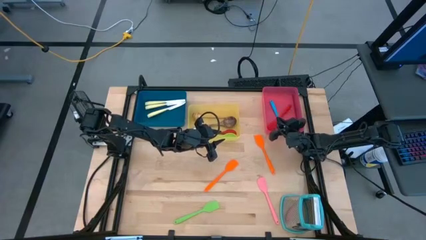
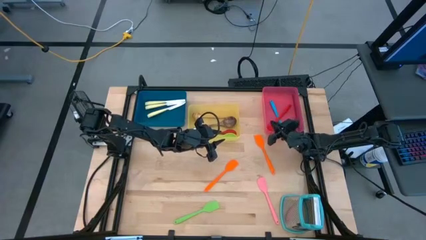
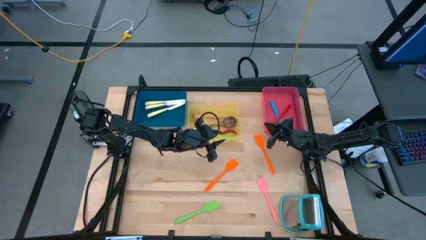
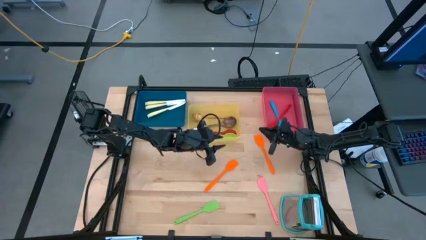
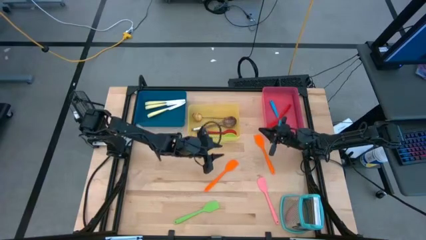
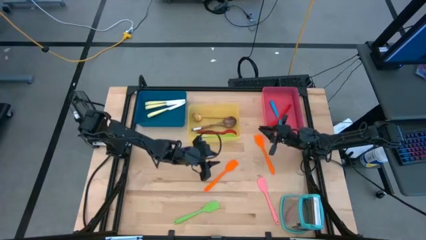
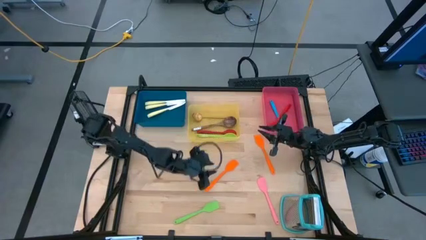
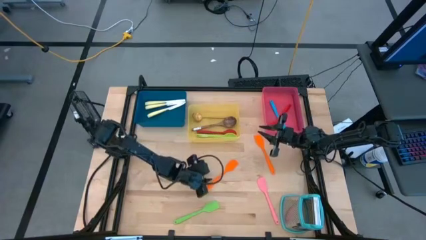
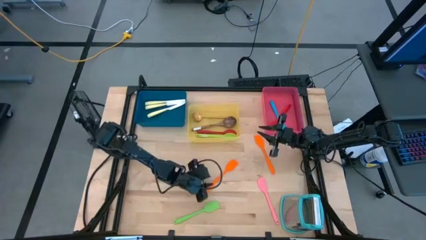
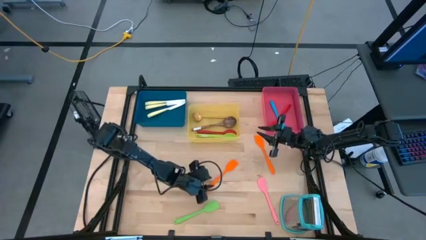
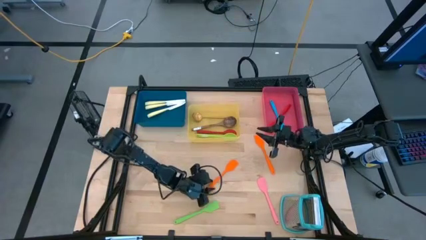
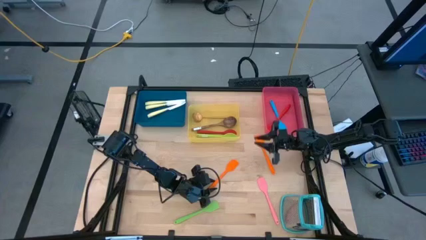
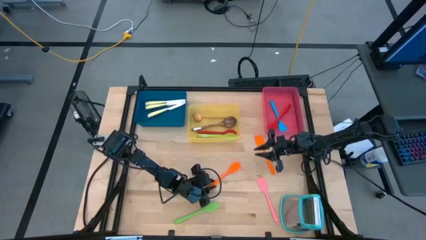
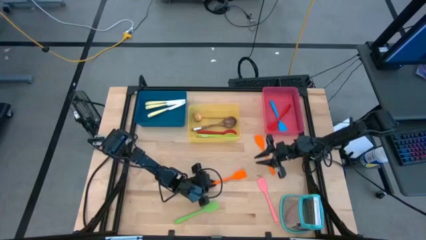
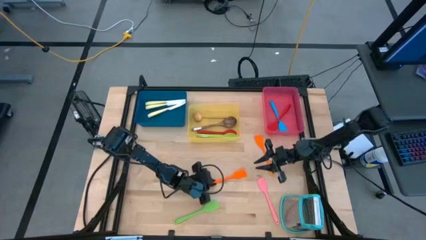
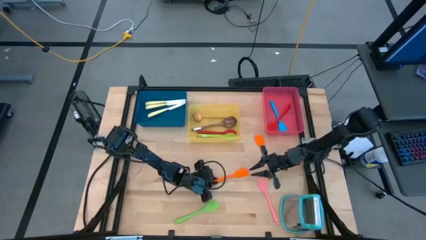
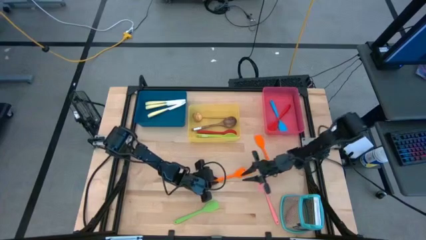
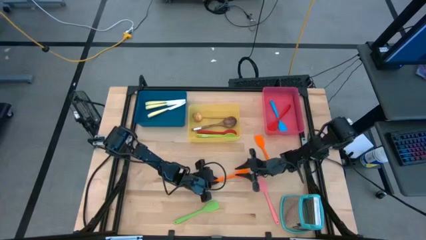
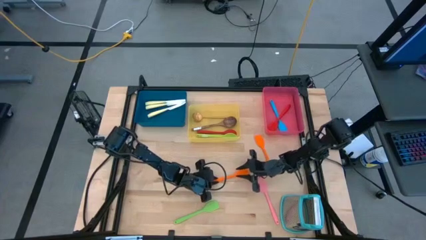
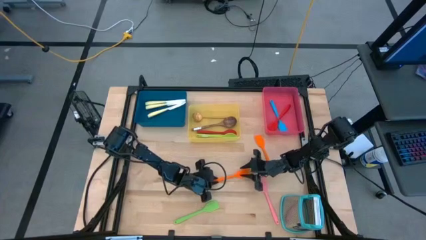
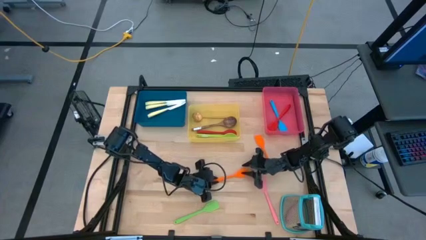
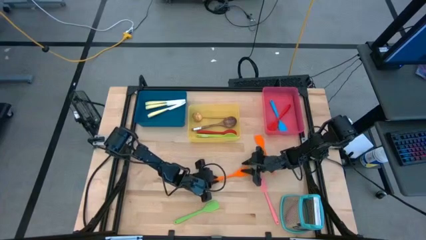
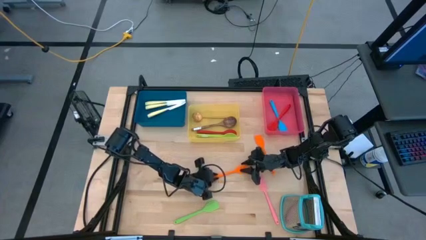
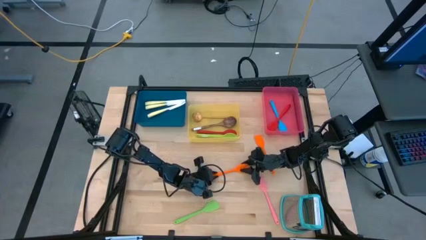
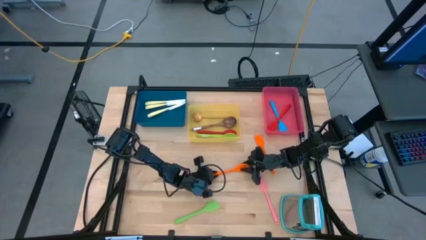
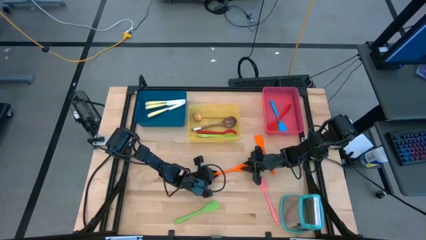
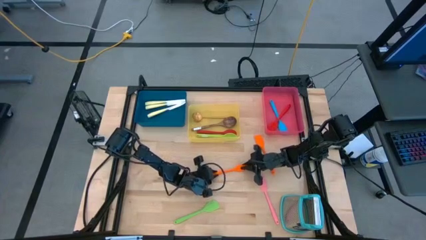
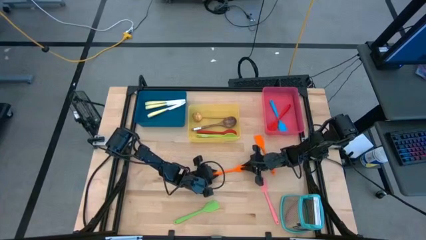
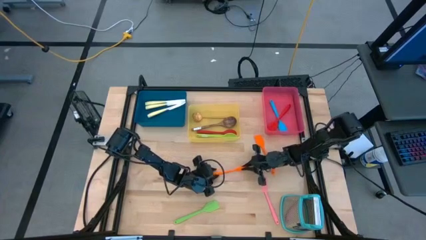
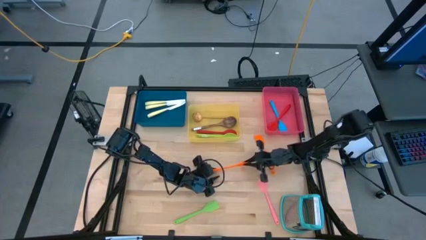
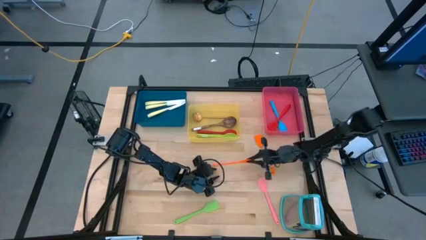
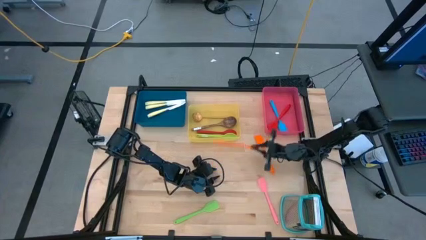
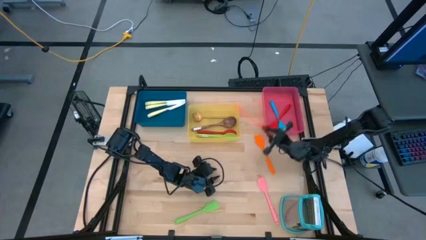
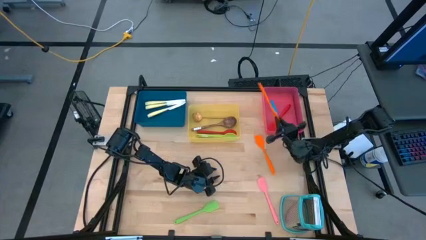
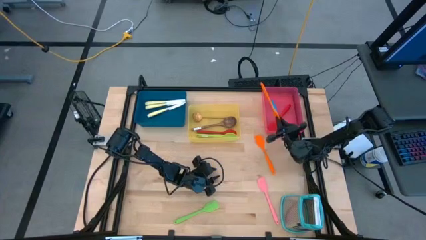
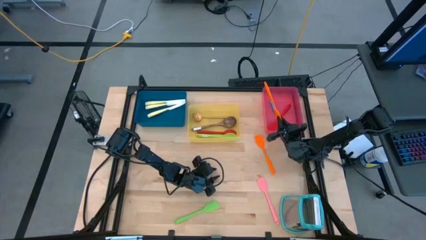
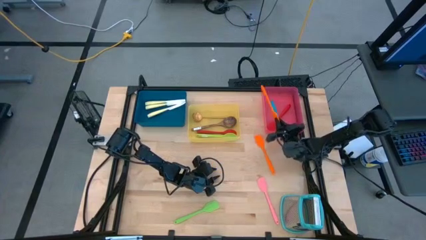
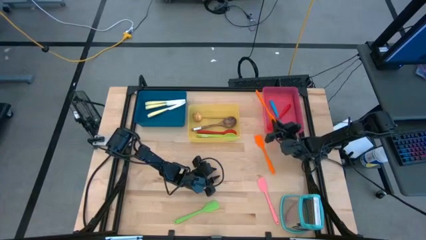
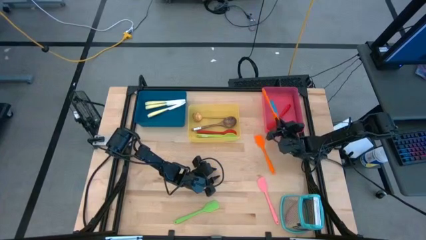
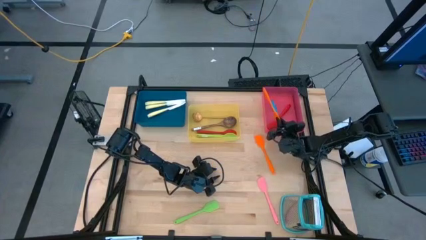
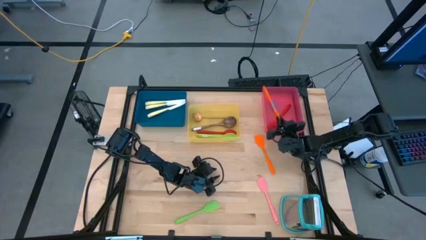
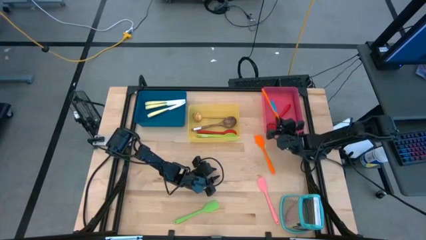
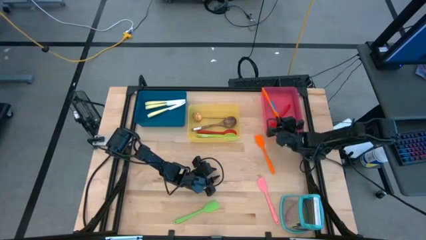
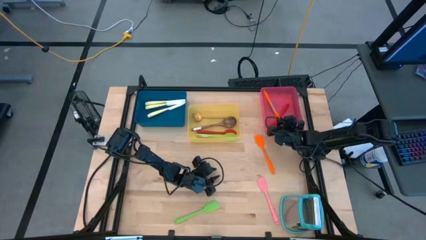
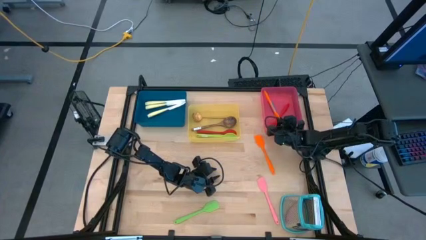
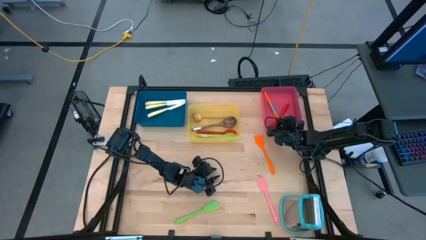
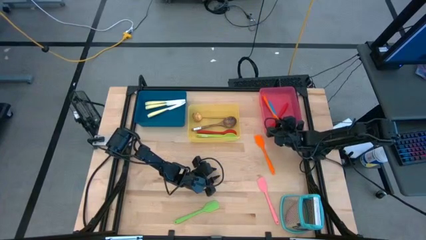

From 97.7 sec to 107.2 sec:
Task: Pick & Place Kitchen Items
Put the left orange spatula into the red bin

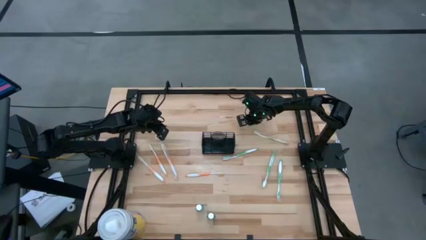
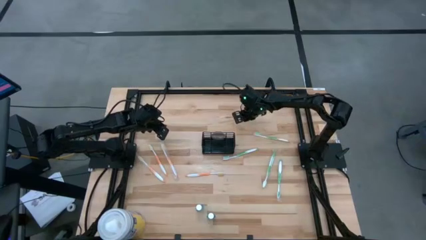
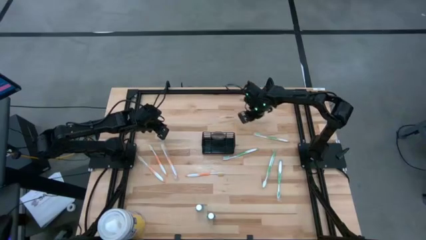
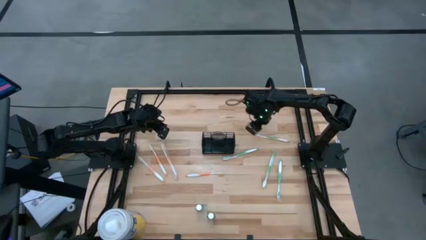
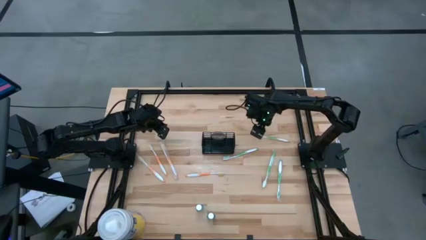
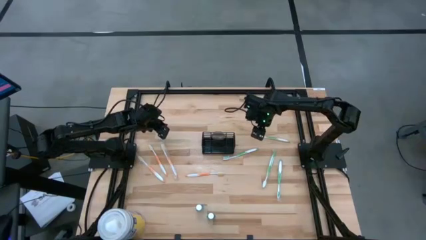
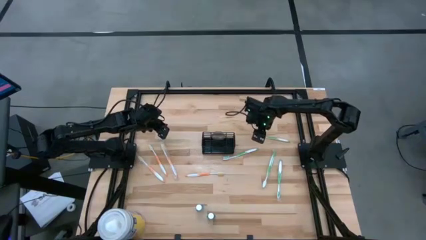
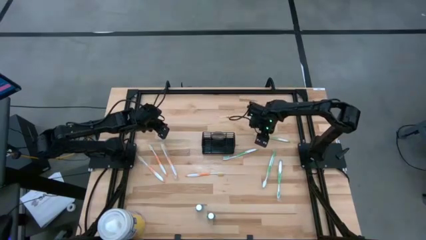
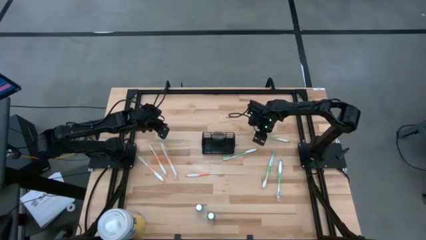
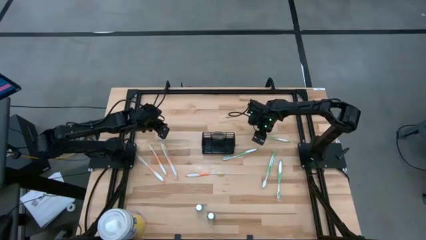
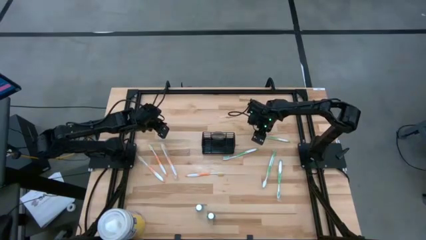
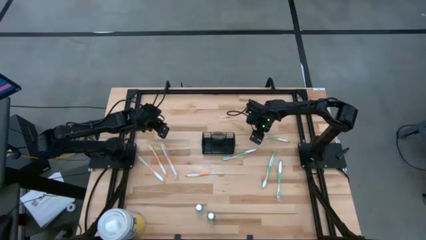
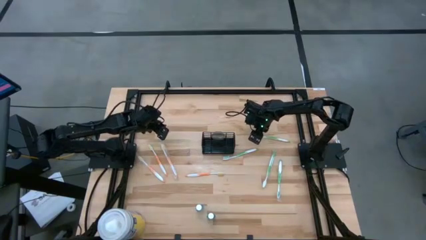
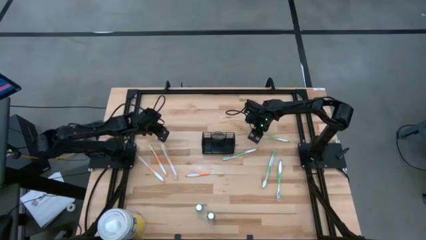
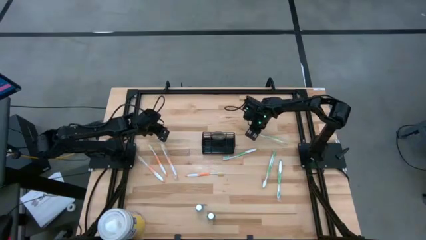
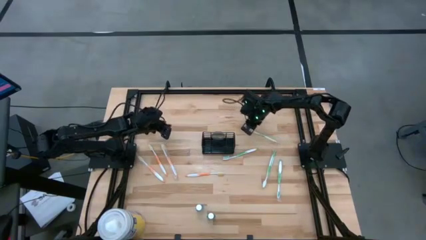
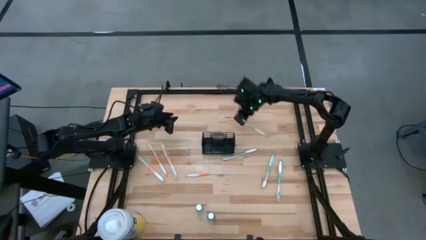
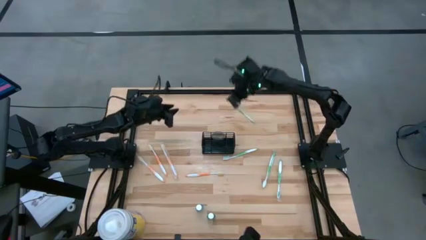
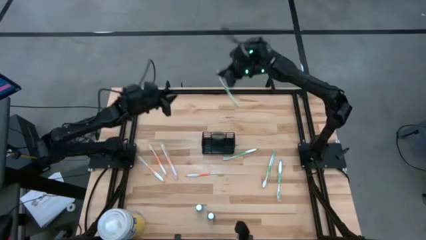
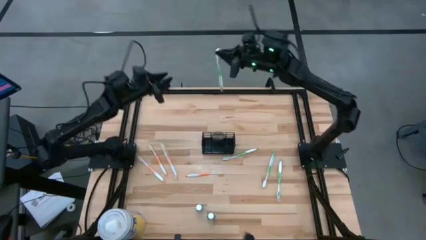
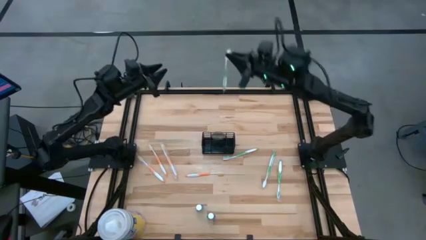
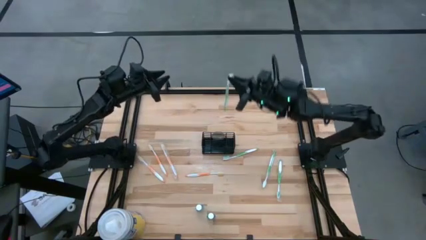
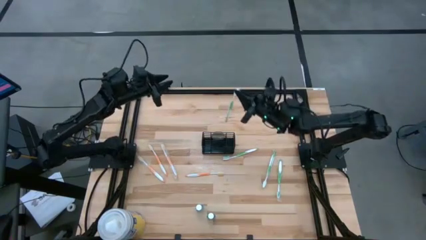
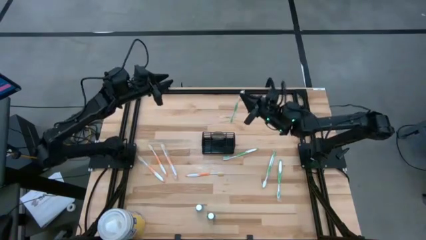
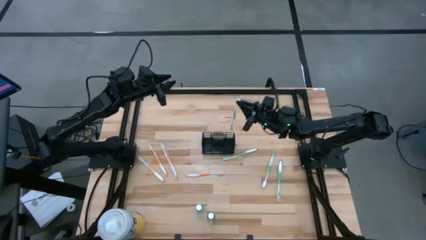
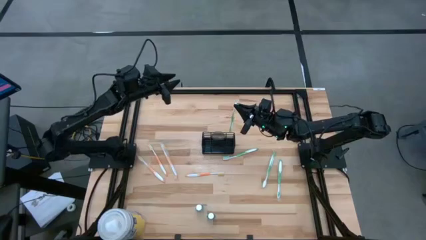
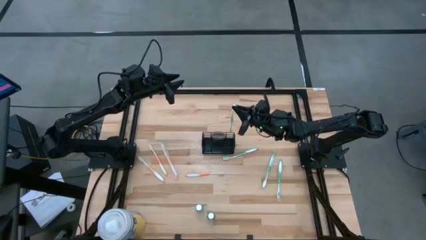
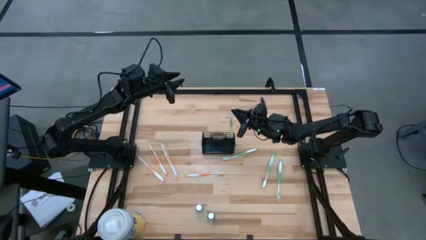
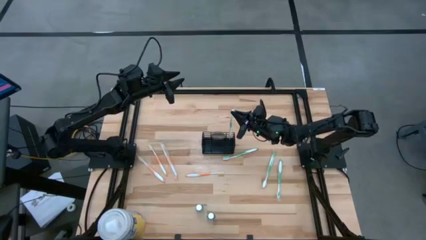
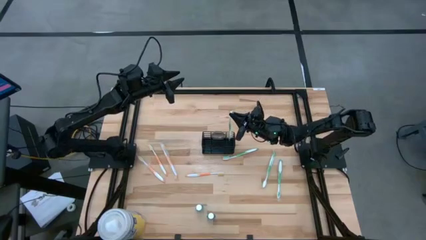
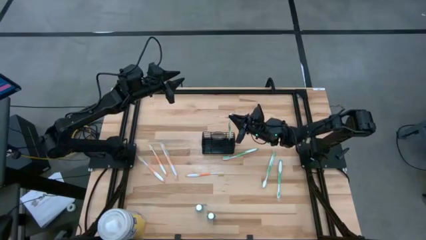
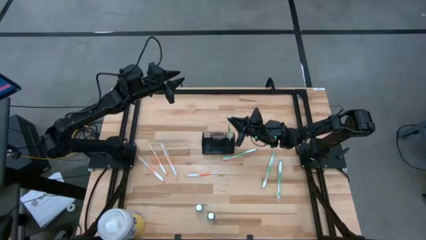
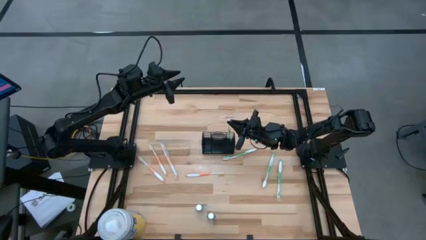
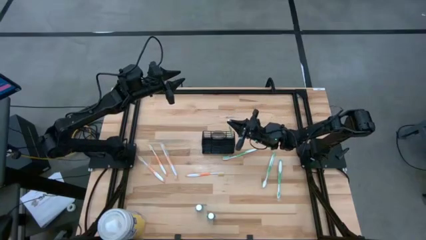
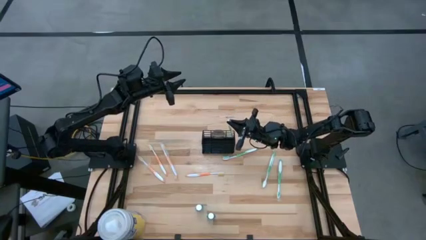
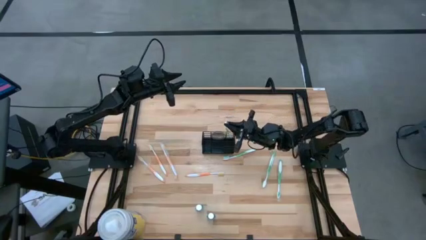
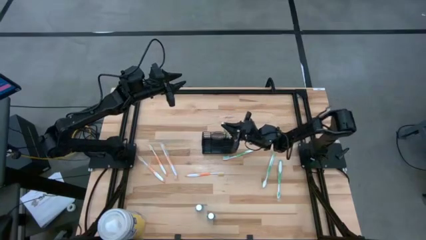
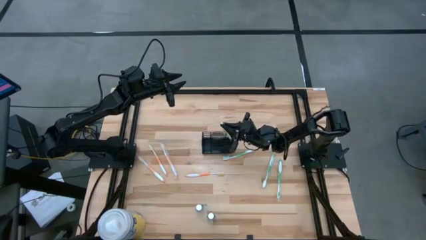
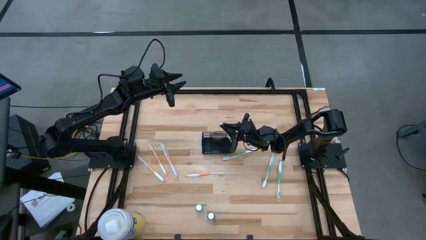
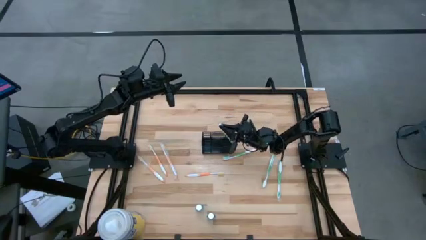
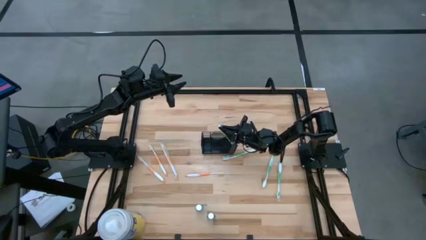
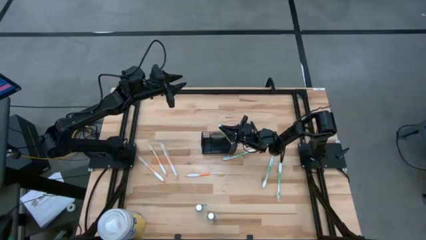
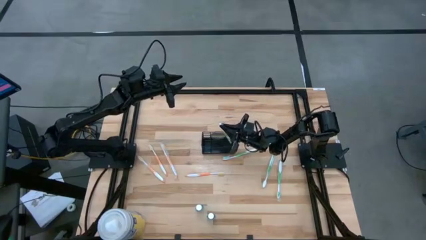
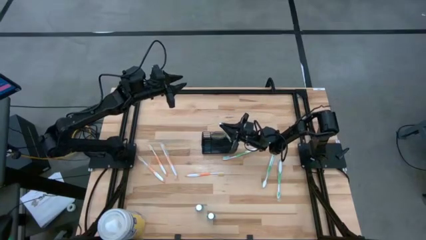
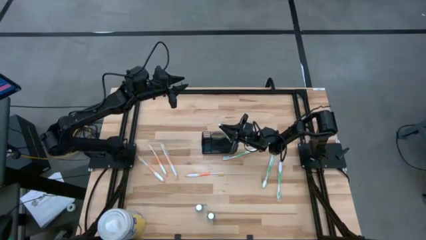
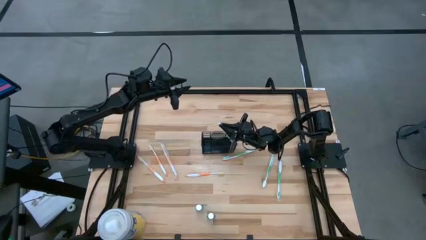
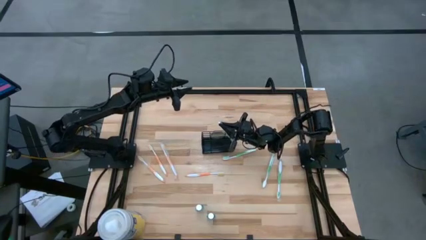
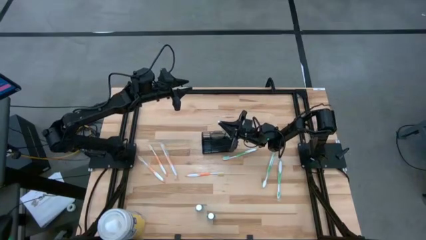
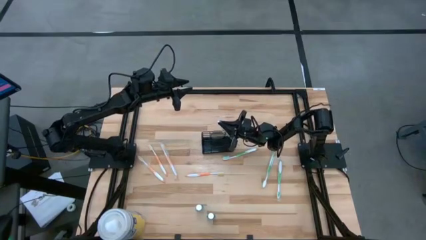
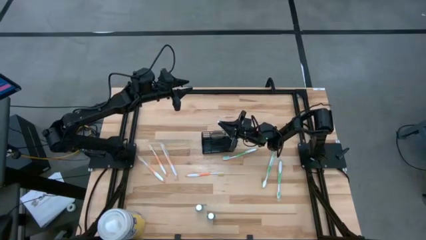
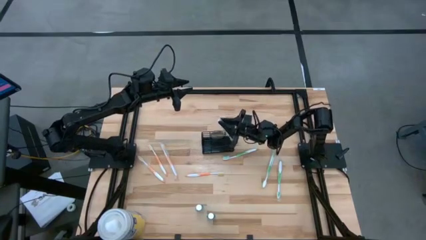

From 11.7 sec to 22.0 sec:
Task: Pick & Place toothbrushing station
Put the green toothbrush into the wire organizer
